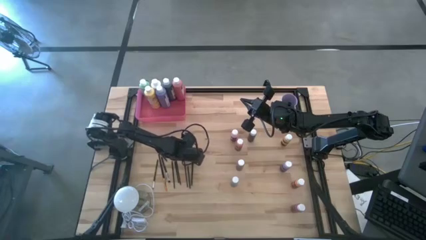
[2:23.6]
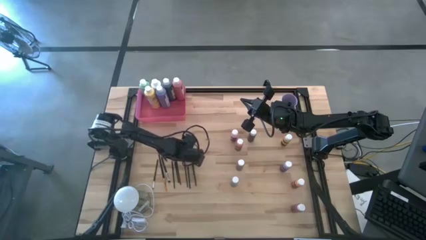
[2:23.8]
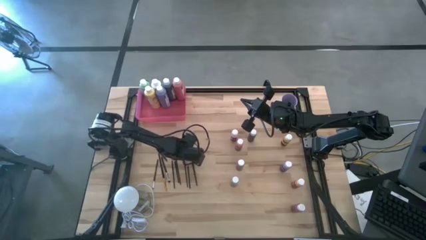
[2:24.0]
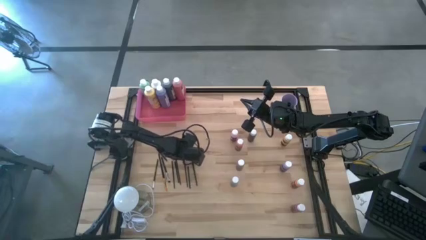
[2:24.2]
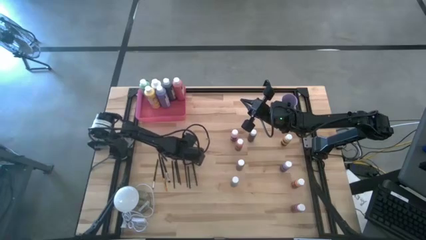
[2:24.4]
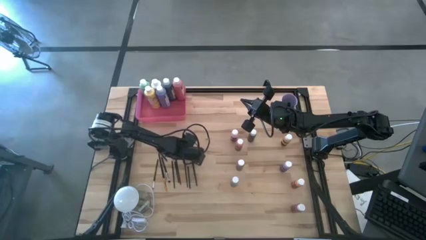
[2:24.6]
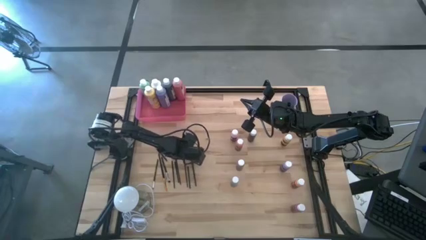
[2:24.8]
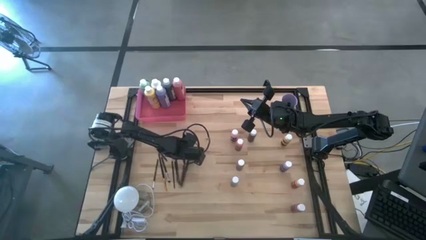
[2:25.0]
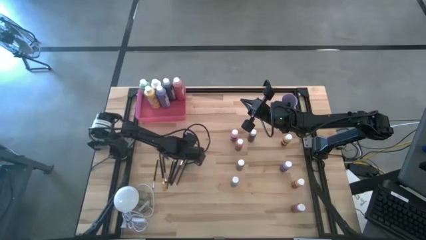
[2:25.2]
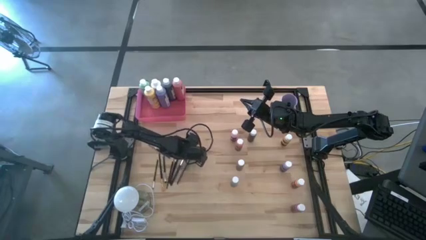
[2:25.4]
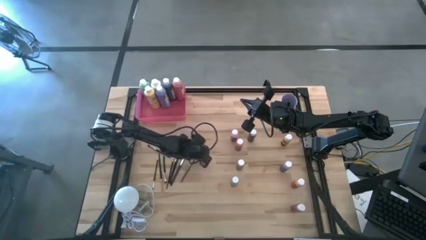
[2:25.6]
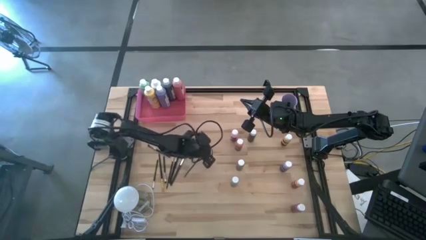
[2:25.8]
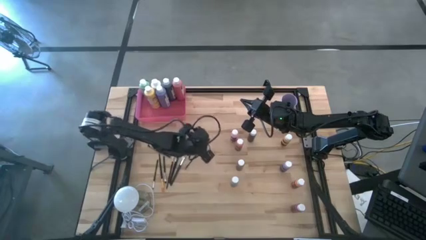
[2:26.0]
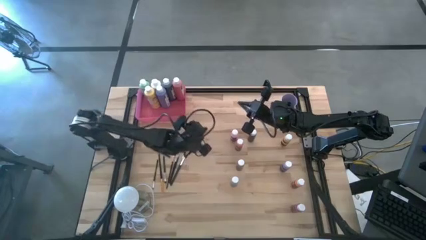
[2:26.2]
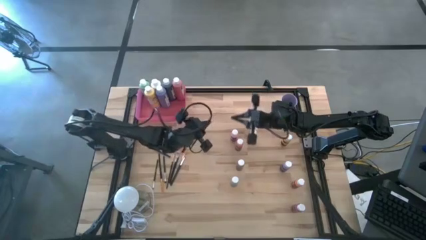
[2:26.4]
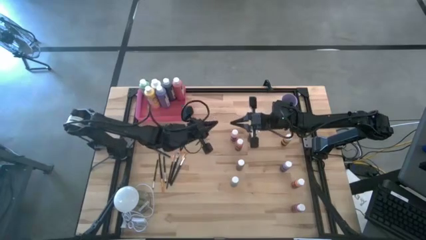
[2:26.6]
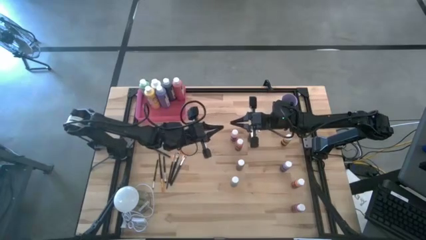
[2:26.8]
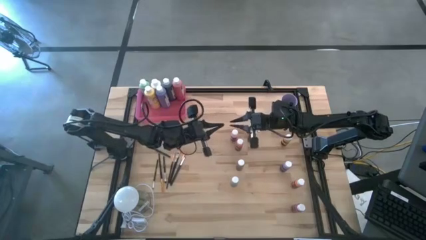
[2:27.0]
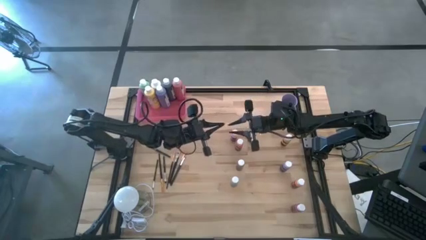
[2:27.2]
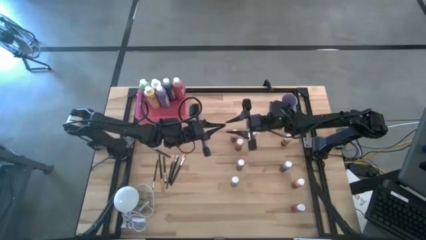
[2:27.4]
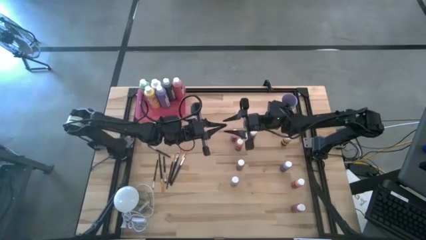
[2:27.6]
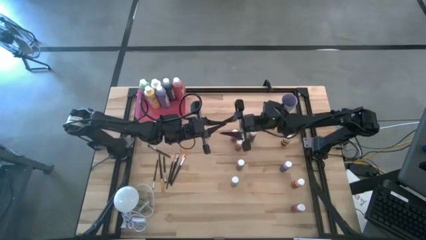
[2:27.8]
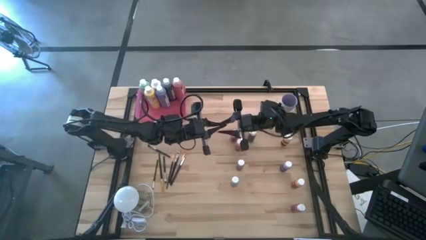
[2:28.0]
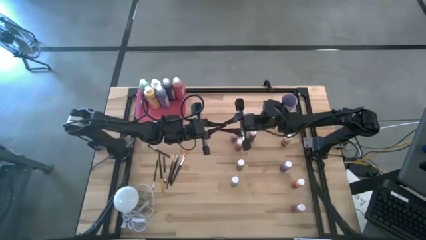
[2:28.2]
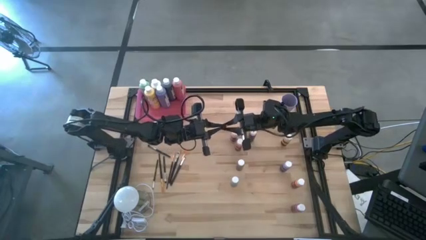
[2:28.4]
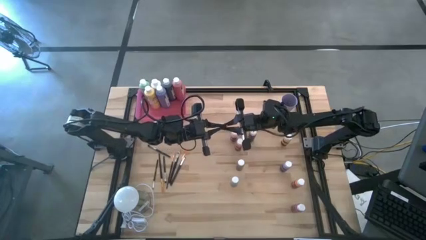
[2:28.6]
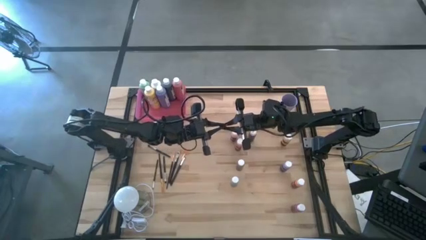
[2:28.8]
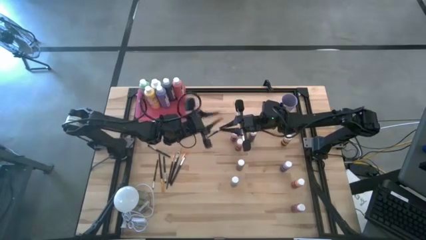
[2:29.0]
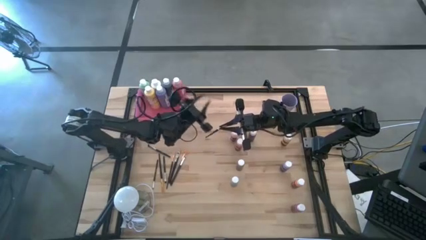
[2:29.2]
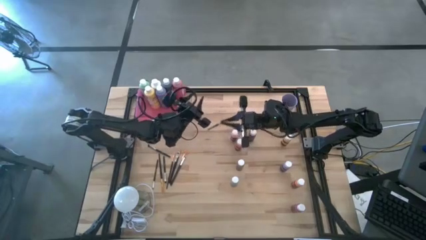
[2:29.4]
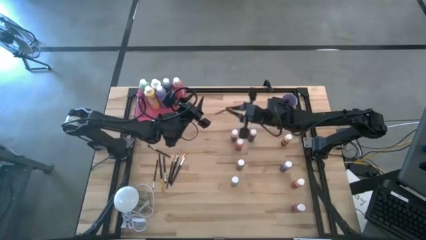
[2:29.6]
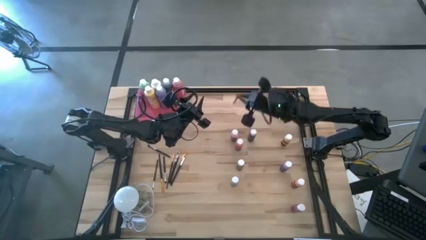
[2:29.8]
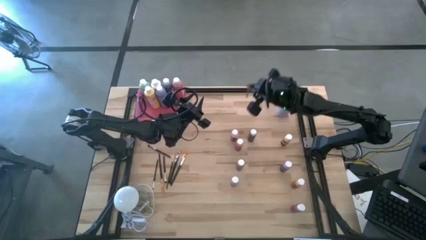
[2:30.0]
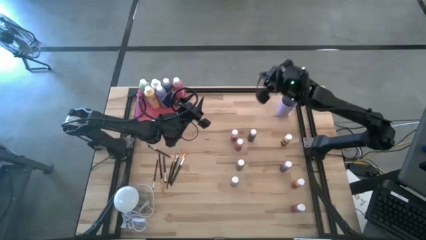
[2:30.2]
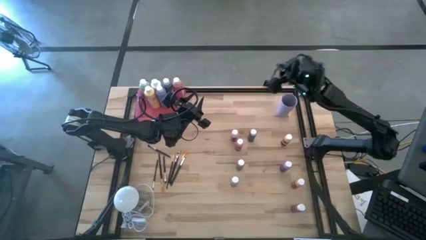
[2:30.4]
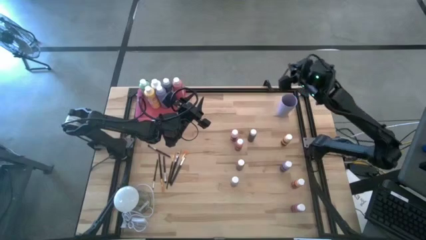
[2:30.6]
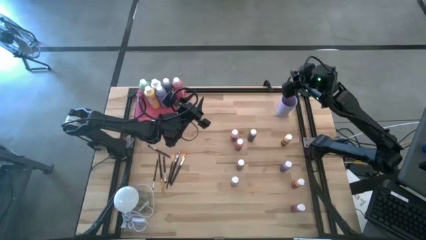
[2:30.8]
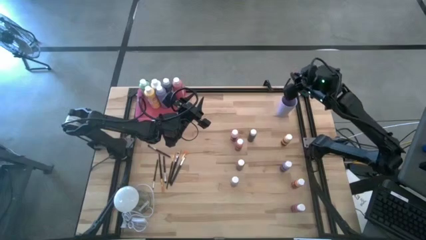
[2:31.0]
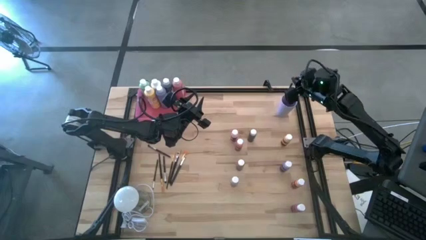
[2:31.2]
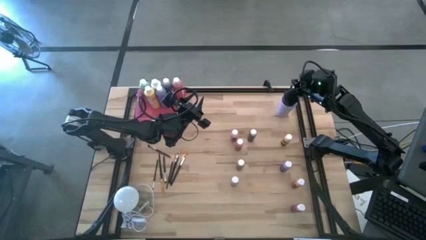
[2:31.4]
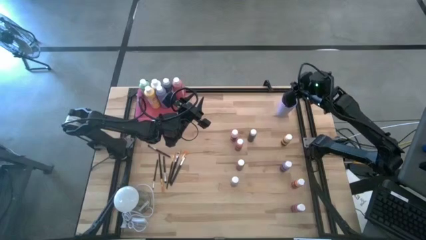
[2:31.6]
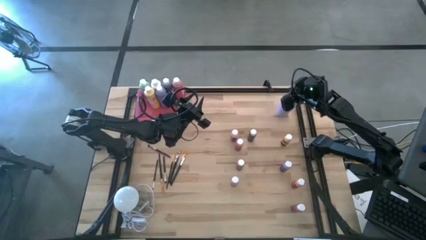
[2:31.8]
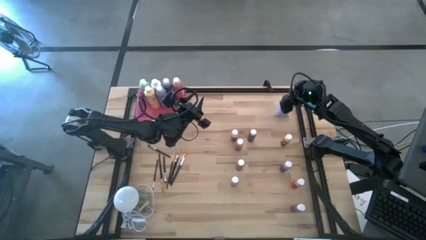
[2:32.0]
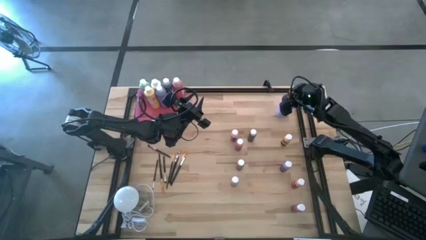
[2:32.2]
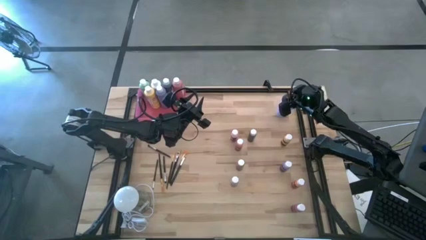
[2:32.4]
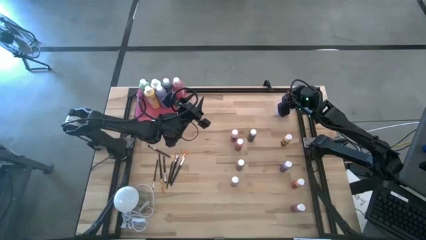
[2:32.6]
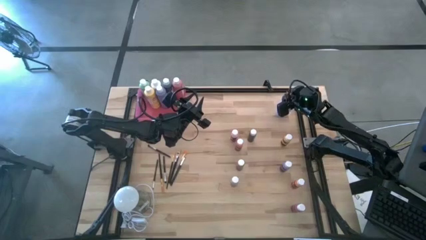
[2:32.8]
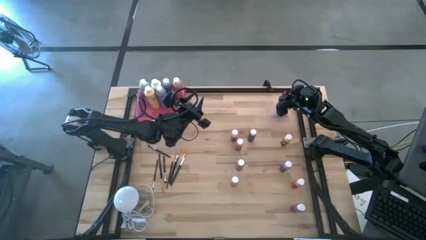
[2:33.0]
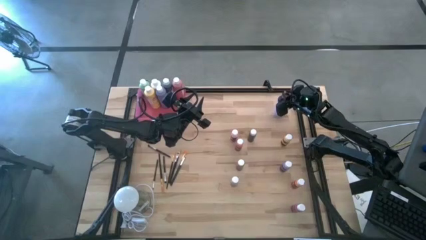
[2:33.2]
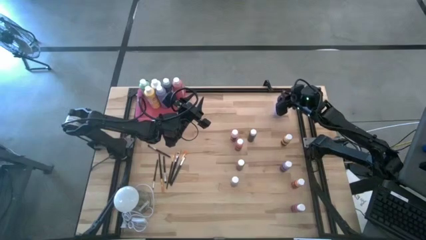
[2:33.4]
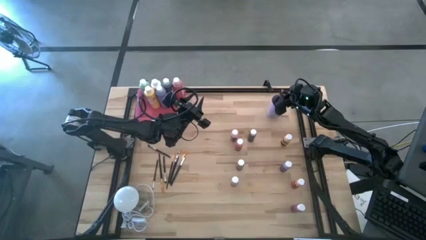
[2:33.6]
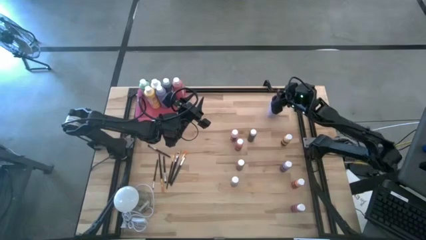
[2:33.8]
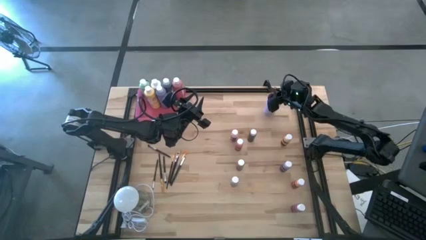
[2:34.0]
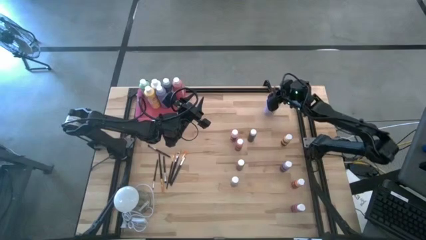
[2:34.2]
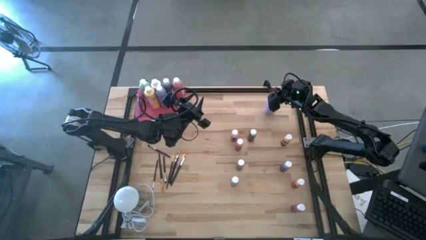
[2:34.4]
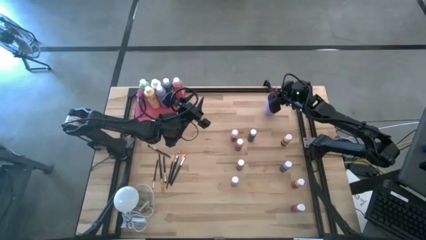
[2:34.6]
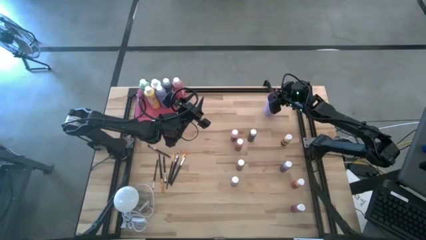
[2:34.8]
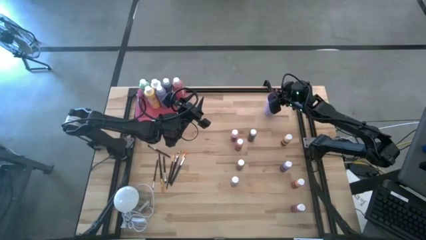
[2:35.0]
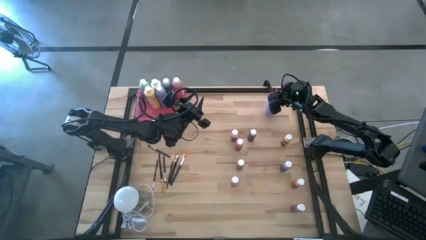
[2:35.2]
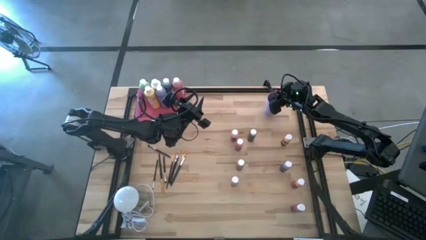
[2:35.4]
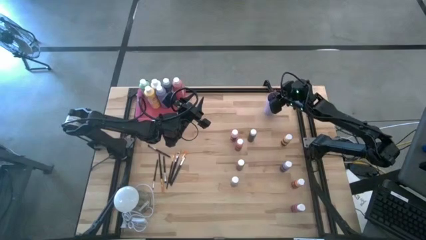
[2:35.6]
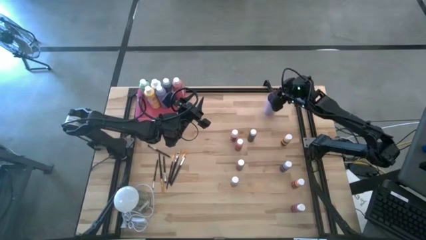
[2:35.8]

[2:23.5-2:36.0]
Task: Pick & Place Paint Supplies
Put the gold paint brush into the purple cup

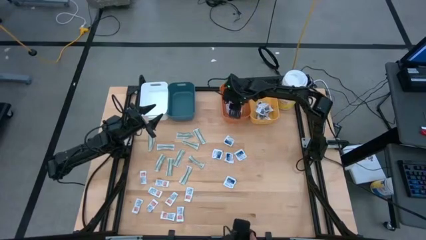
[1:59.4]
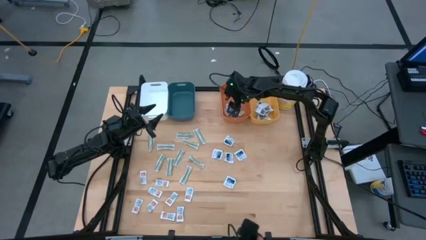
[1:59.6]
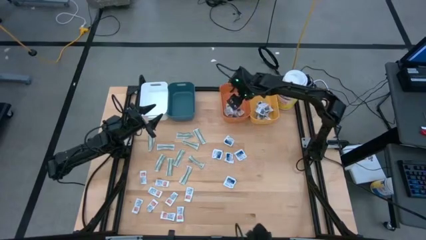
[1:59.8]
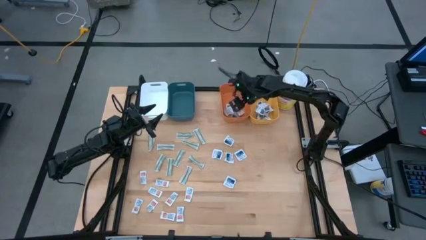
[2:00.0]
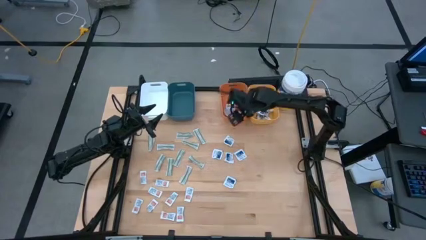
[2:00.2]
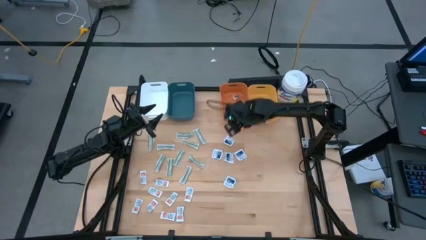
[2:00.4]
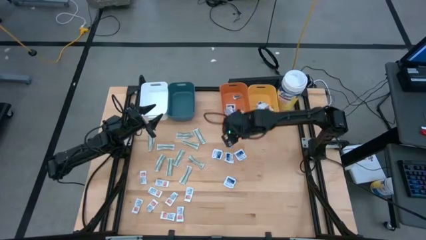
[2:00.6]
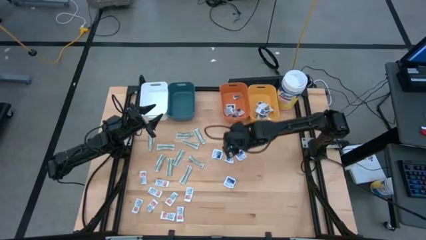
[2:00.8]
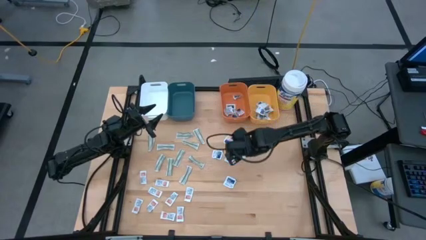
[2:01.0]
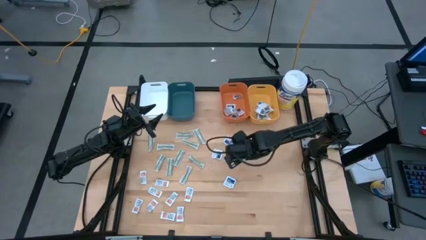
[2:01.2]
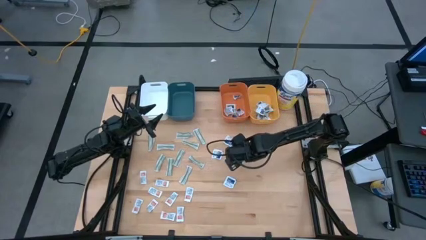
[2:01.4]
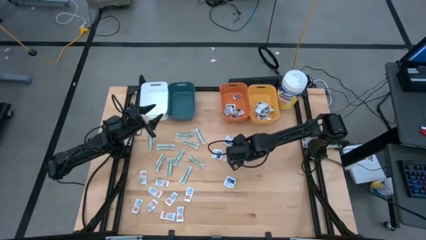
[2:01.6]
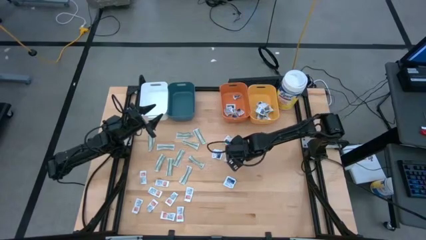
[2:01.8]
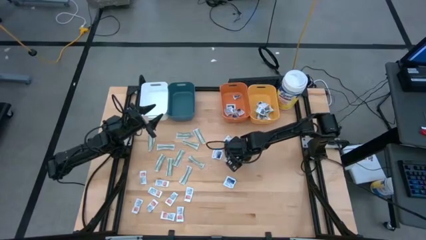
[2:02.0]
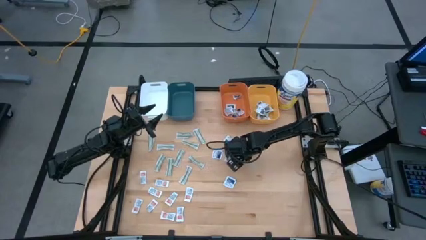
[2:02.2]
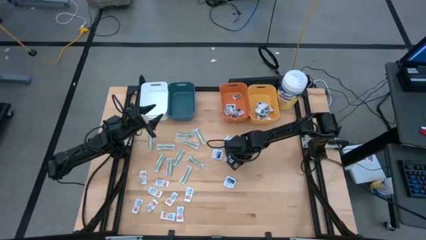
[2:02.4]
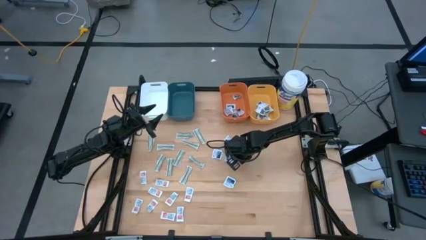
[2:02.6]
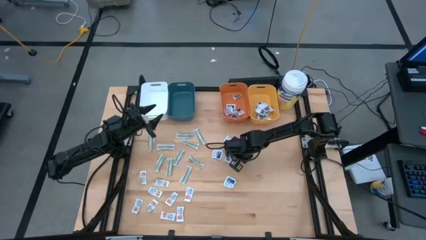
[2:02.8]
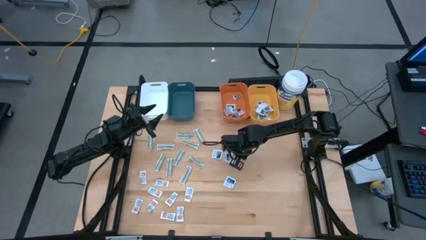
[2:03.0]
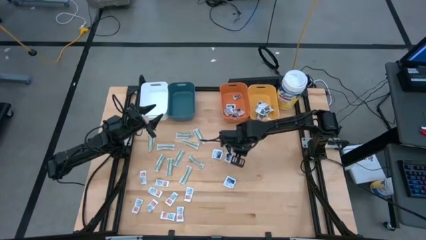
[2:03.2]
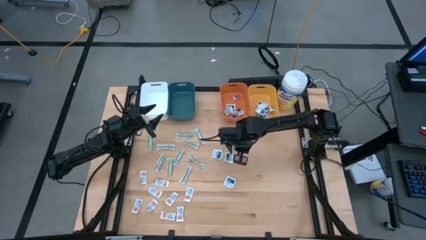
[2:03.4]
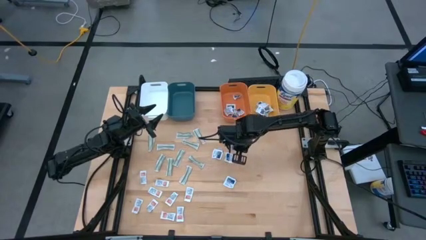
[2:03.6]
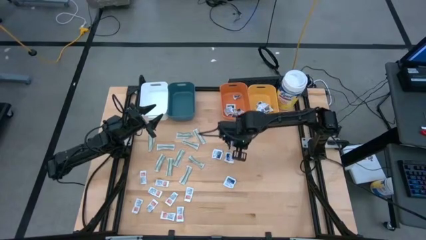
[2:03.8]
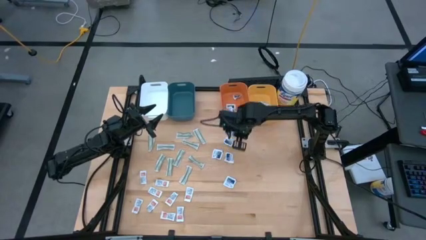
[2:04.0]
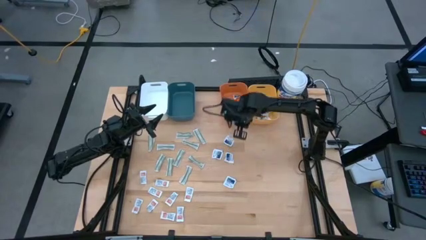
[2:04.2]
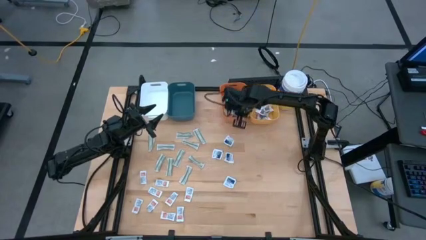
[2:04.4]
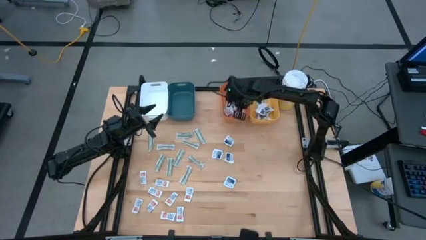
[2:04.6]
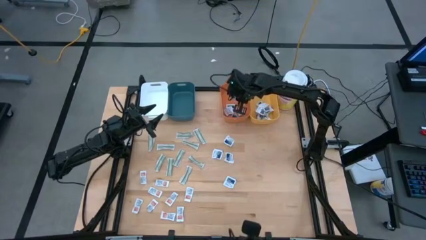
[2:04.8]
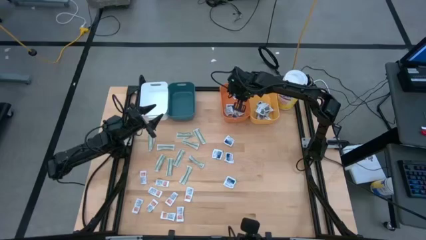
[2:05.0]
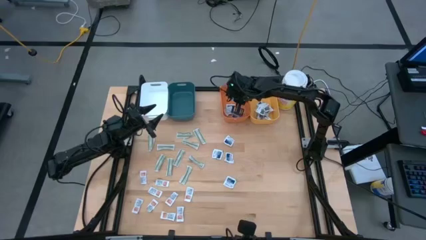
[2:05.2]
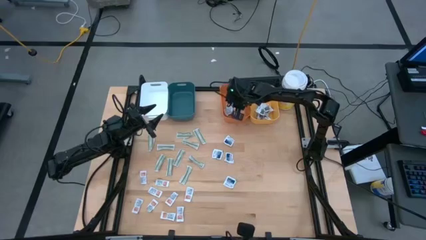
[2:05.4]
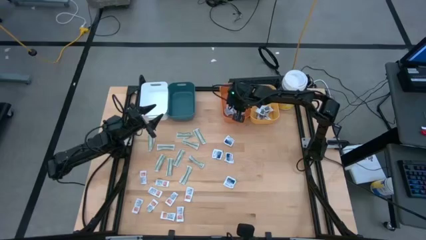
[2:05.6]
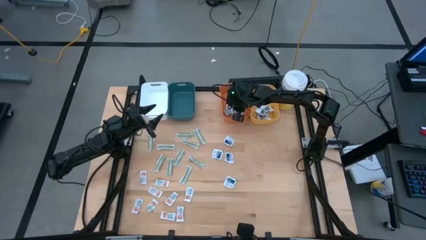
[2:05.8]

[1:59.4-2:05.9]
Task: Pick & Place First Aid Supplies
Put the alcohol pad into the orange bin
